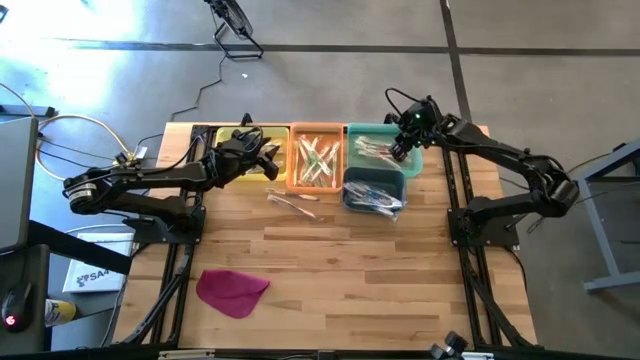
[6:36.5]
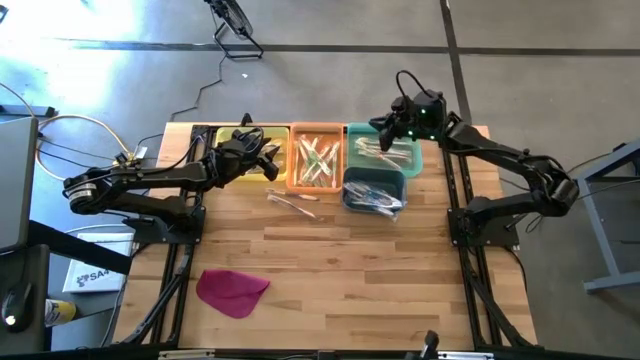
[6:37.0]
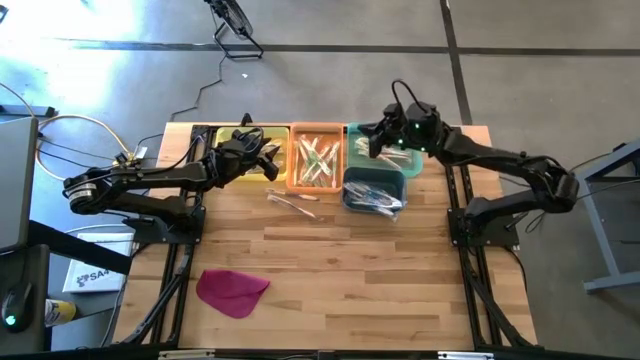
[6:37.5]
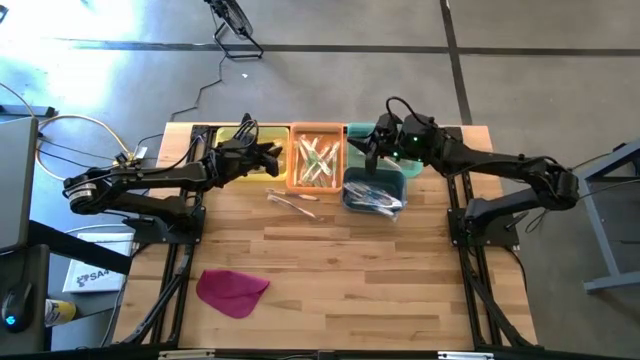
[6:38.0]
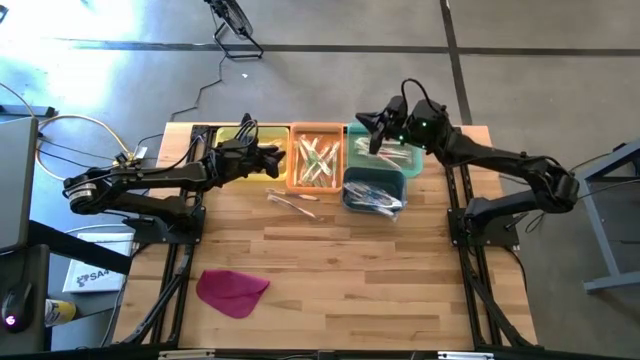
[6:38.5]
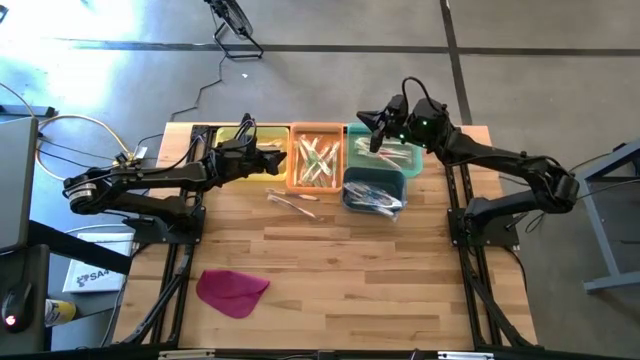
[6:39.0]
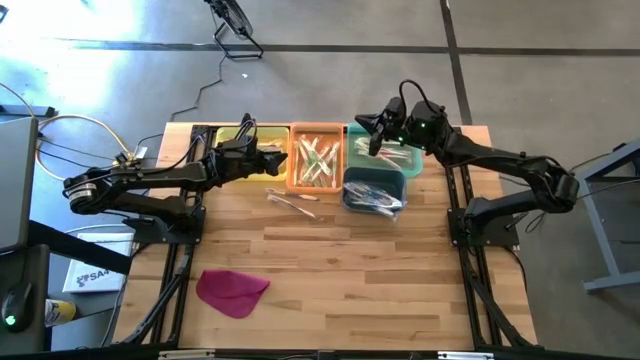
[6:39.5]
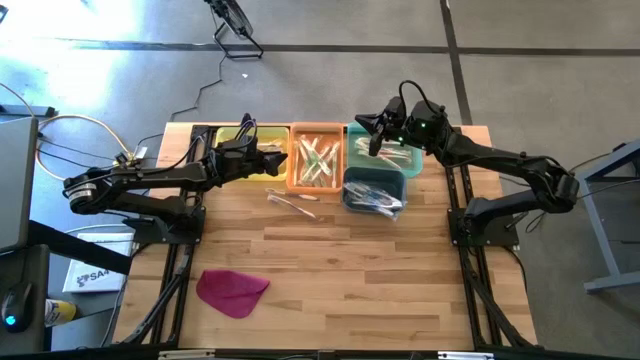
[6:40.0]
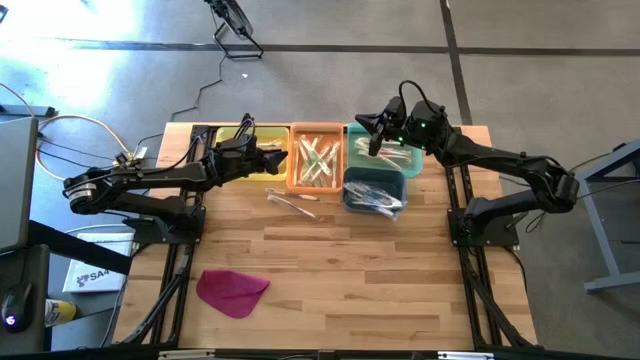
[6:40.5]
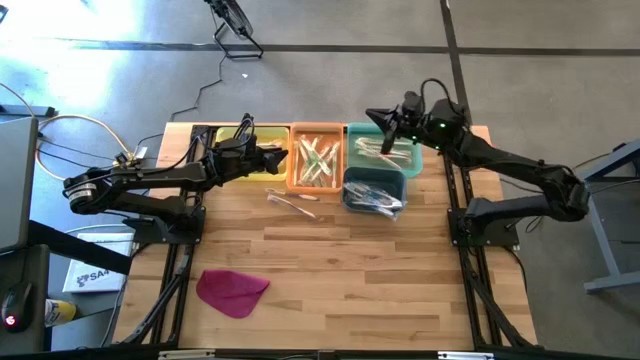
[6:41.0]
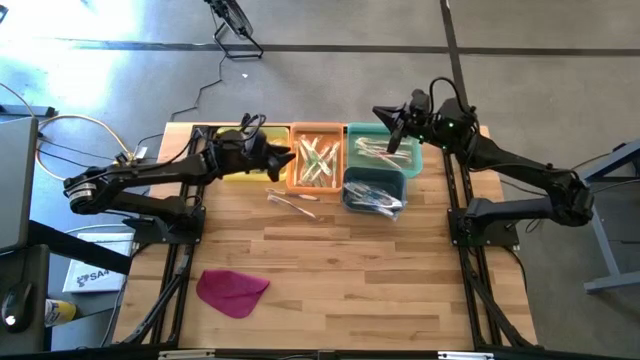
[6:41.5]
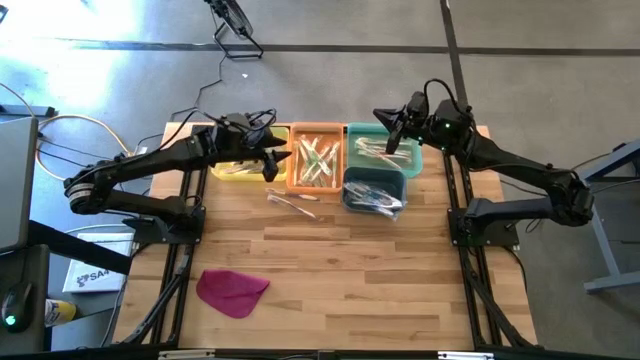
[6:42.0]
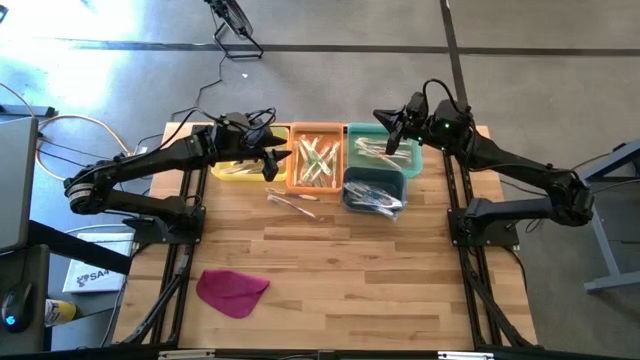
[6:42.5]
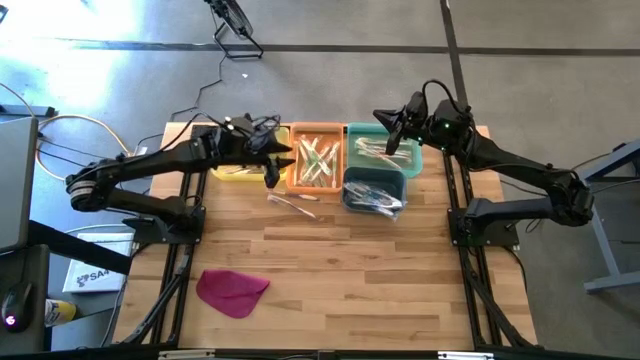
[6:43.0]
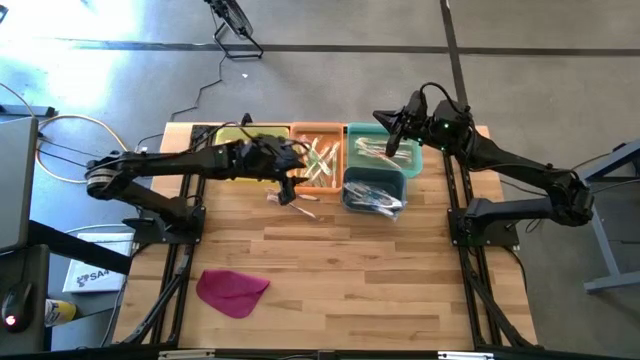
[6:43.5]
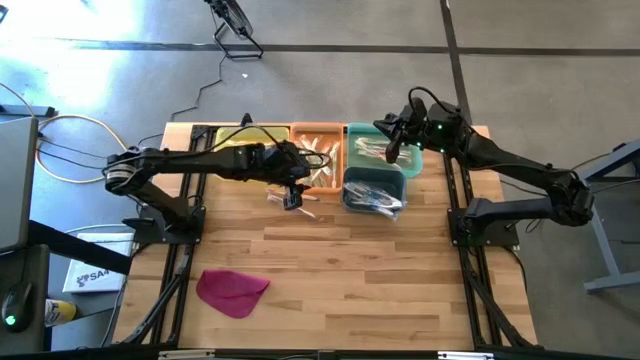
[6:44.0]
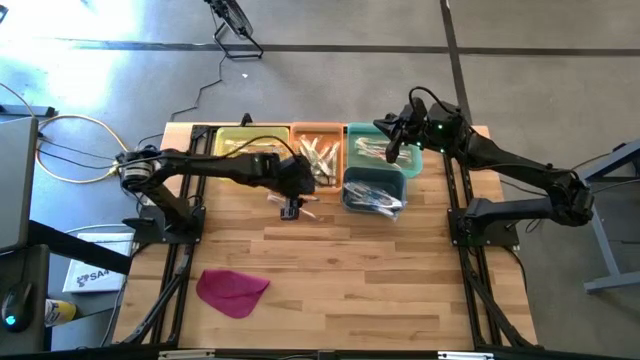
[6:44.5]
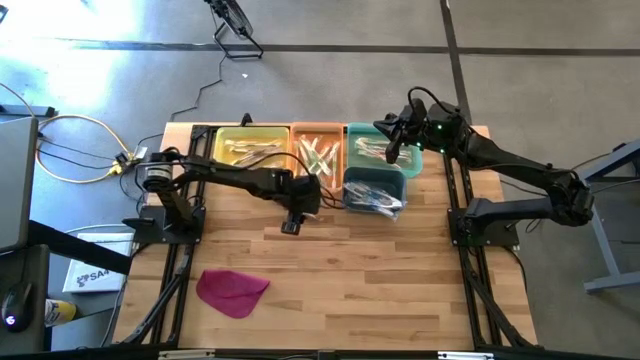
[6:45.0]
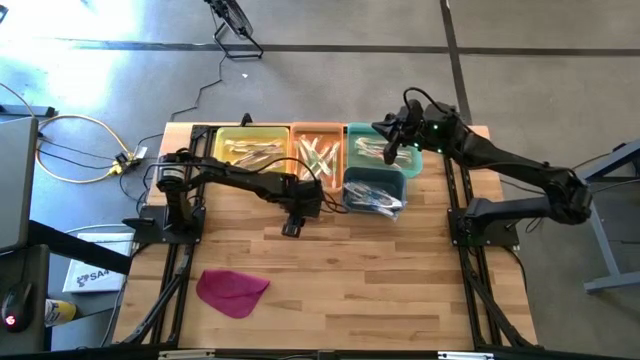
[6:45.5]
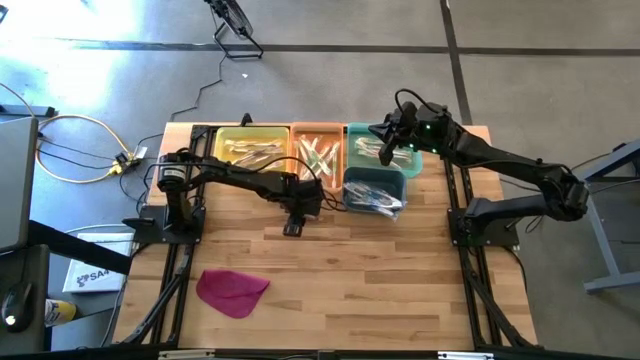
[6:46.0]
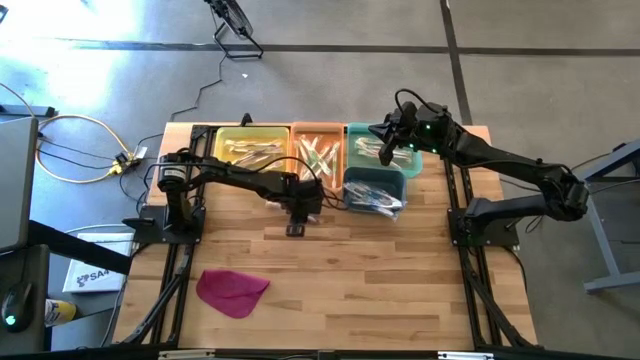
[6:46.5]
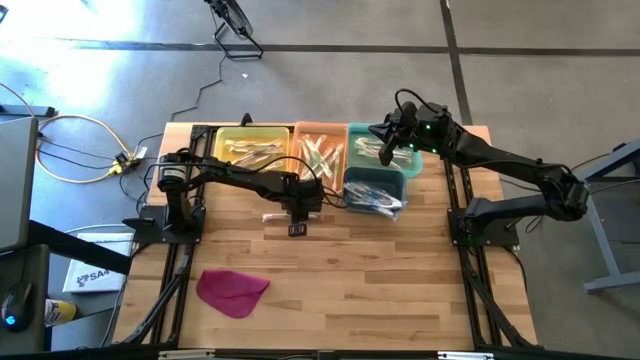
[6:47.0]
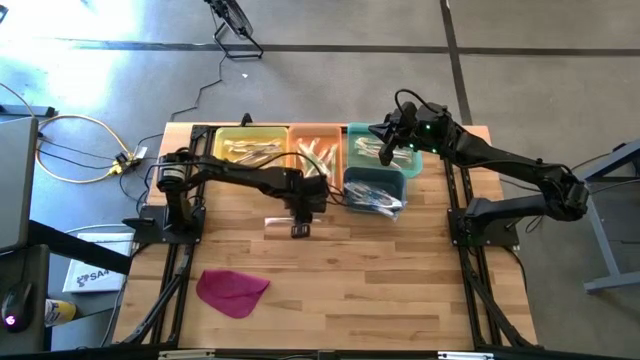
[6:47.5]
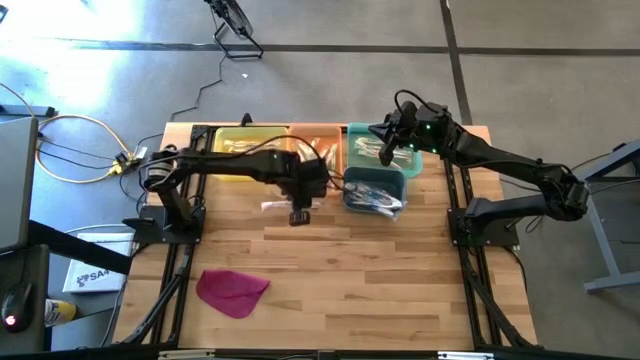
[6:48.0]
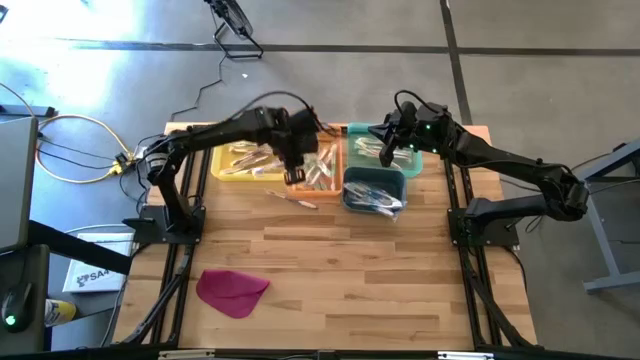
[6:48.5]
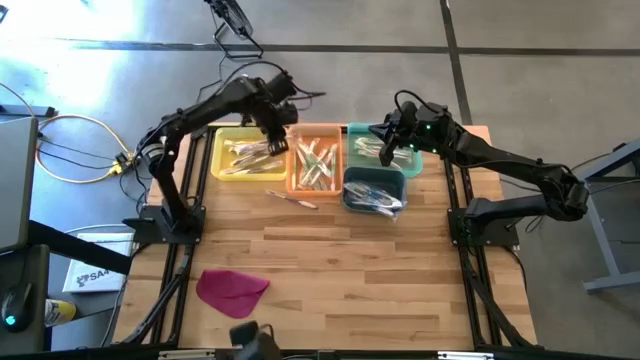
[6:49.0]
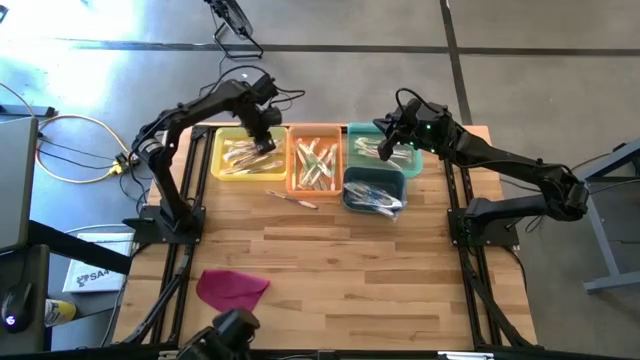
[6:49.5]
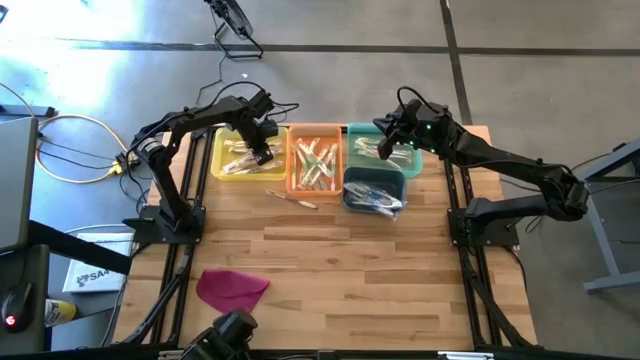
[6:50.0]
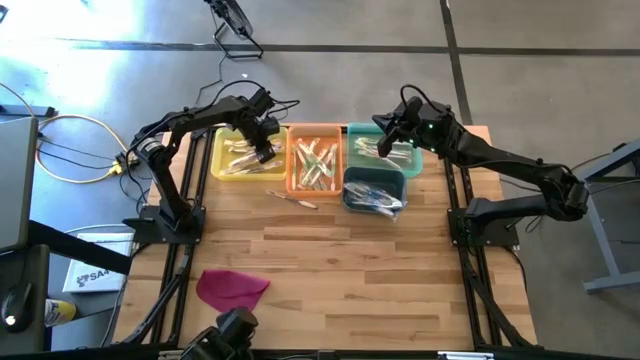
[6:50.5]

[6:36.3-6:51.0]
Task: Pick & Place Toothbrushes
Put the violet toothbrush into the yellow bin

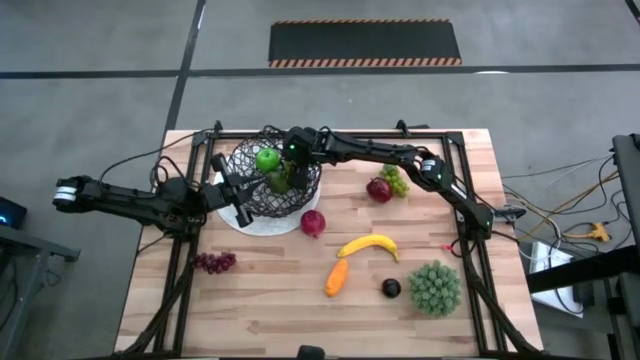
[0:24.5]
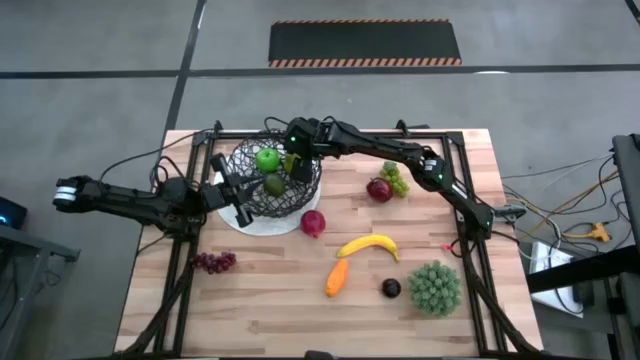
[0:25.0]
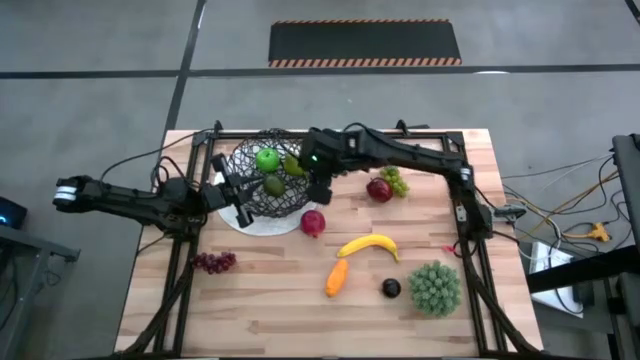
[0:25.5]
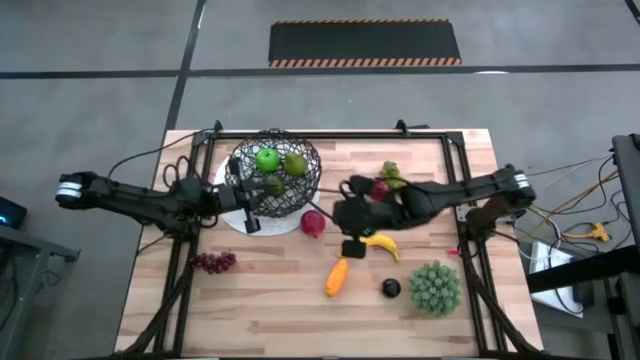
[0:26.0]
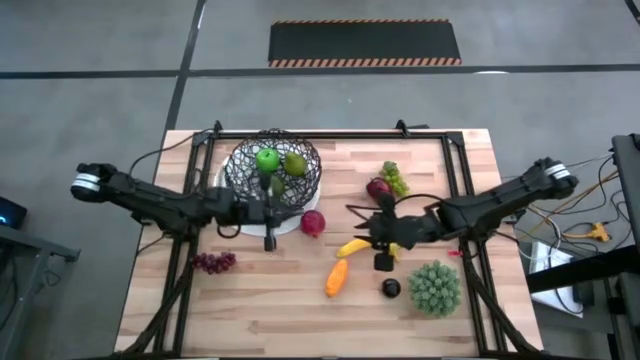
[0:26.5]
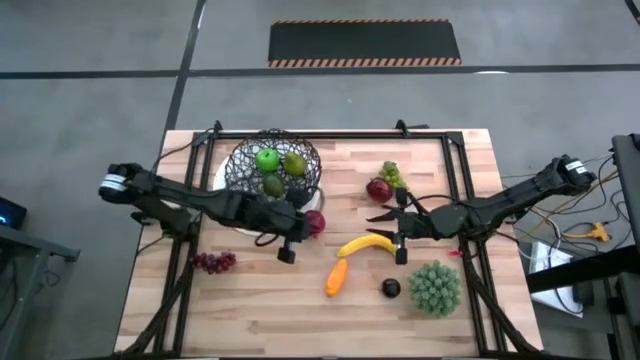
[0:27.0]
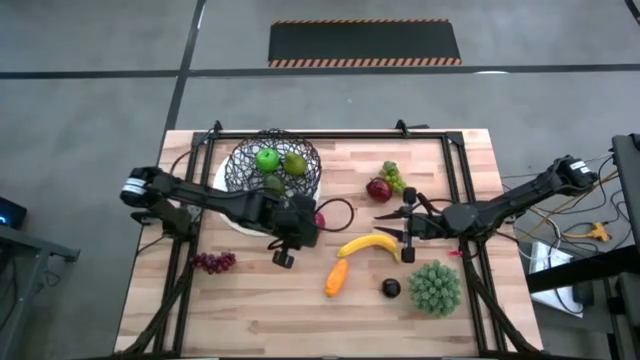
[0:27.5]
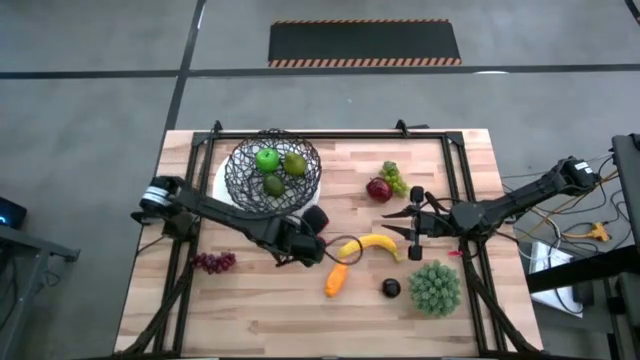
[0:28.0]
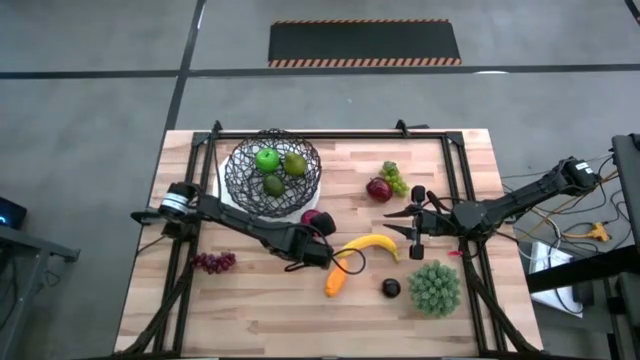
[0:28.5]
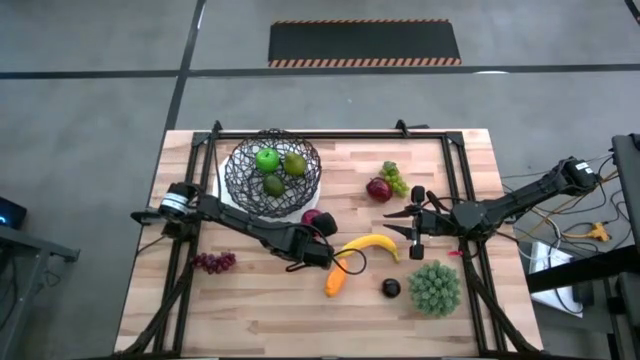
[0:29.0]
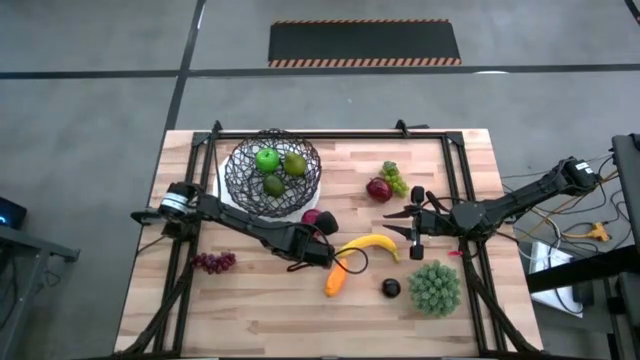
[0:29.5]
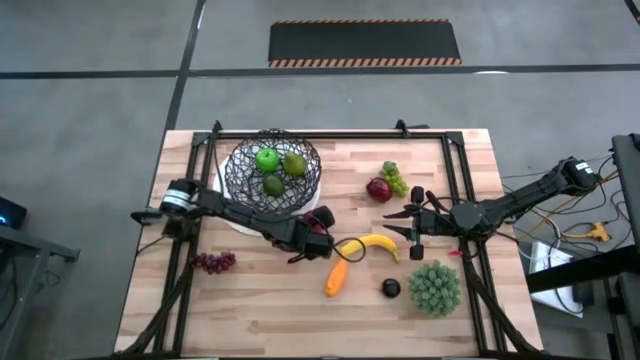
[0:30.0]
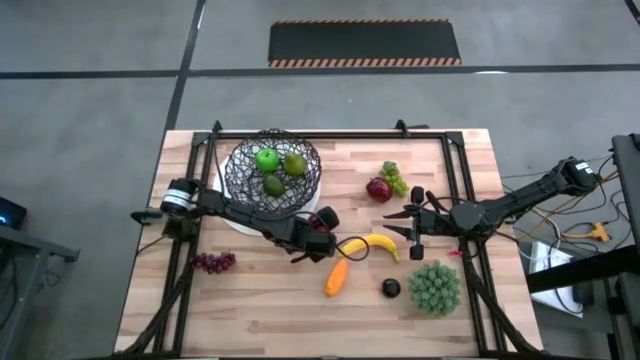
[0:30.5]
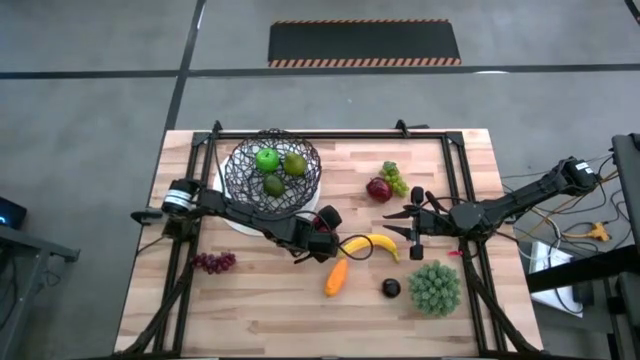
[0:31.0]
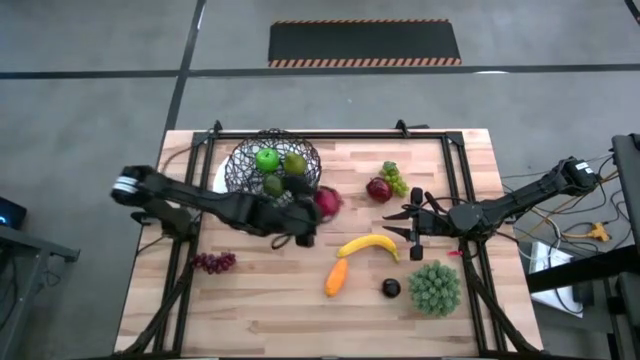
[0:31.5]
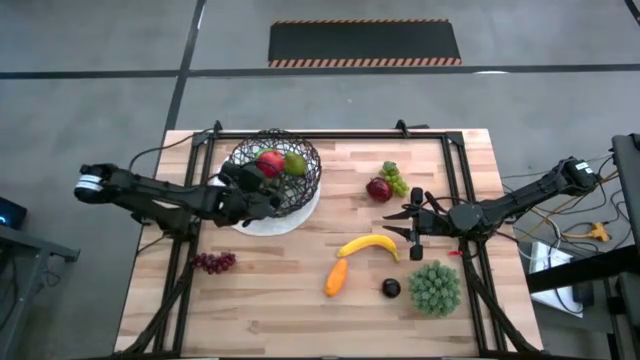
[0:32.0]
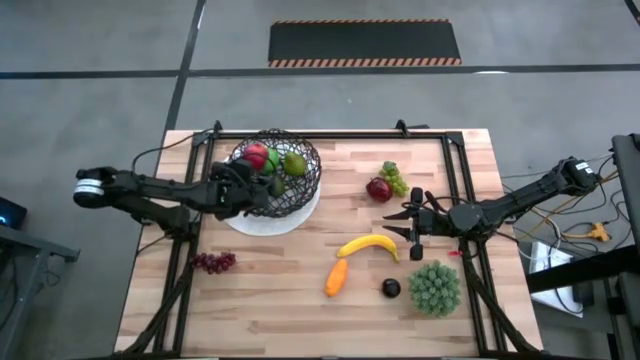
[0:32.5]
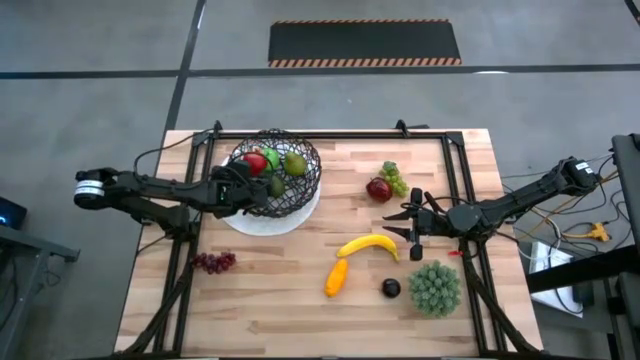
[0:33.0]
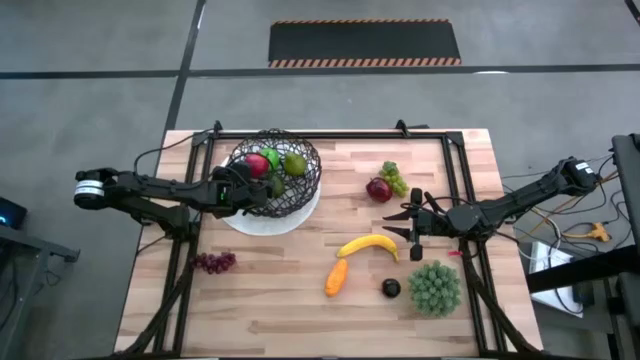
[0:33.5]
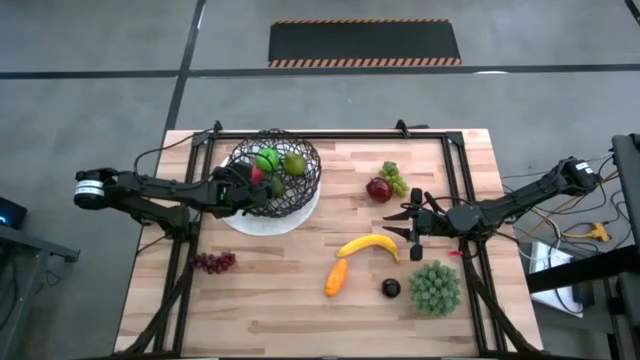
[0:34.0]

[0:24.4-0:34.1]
Task: Build produce basket
Put the pomegranate into the woven basket
